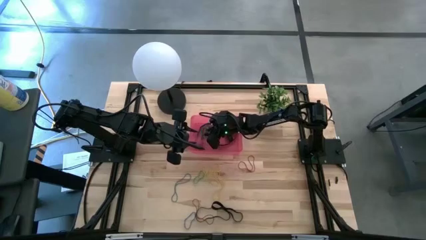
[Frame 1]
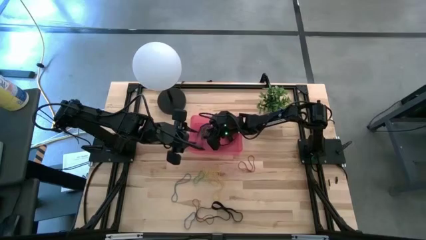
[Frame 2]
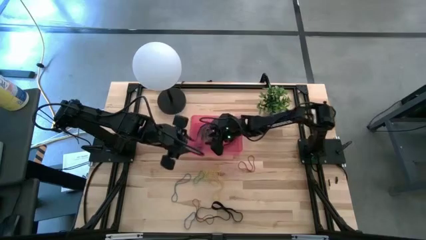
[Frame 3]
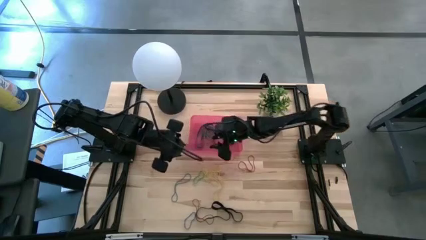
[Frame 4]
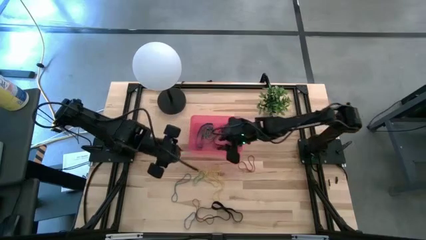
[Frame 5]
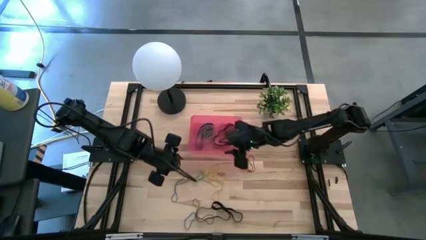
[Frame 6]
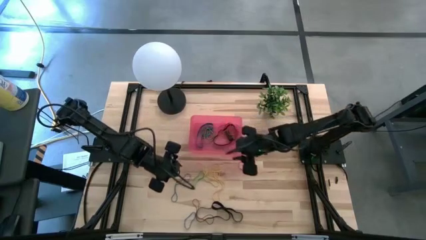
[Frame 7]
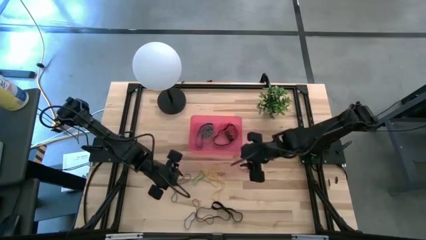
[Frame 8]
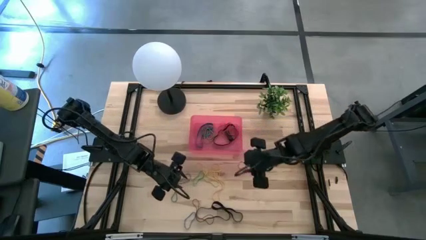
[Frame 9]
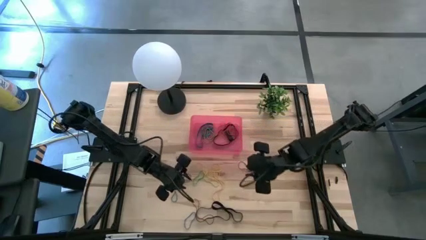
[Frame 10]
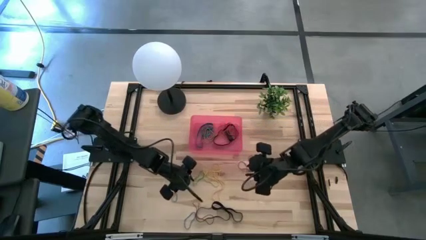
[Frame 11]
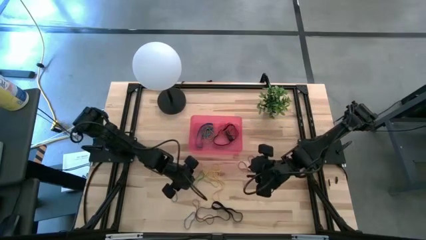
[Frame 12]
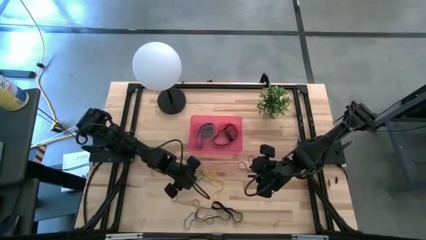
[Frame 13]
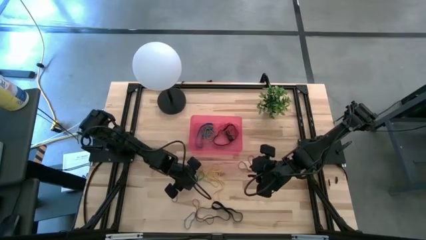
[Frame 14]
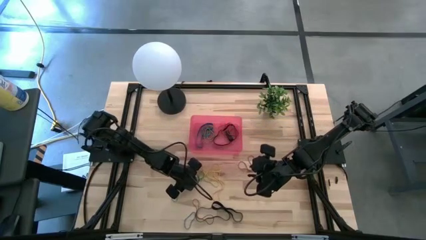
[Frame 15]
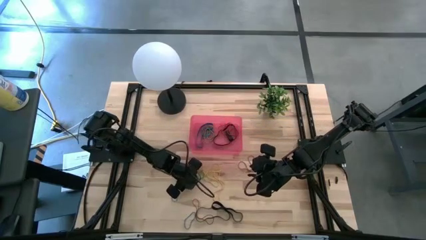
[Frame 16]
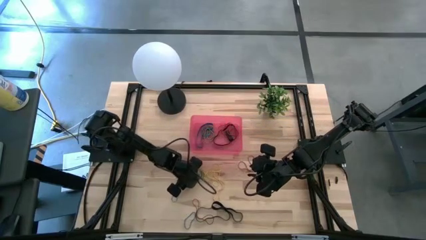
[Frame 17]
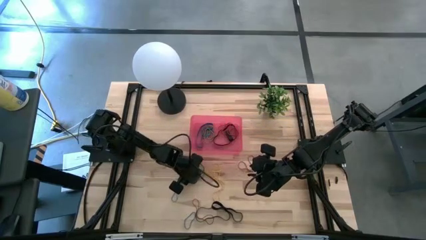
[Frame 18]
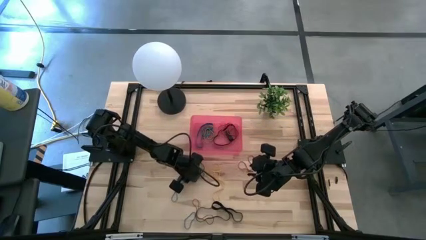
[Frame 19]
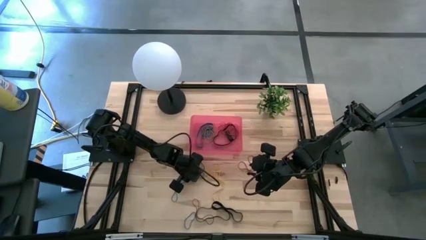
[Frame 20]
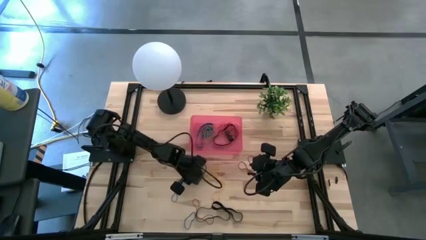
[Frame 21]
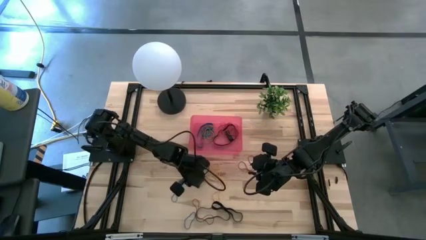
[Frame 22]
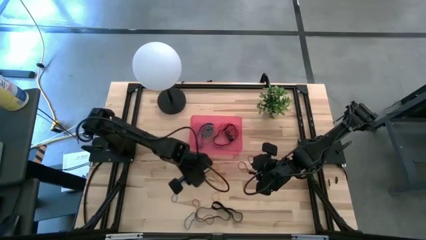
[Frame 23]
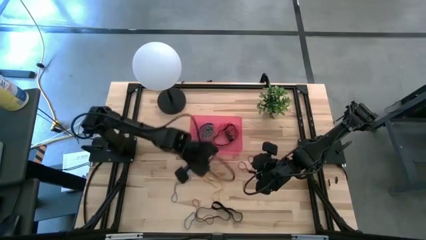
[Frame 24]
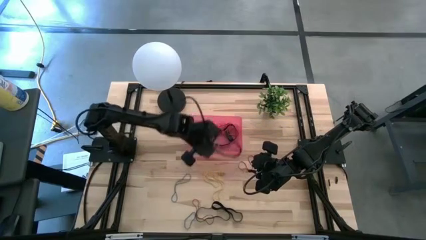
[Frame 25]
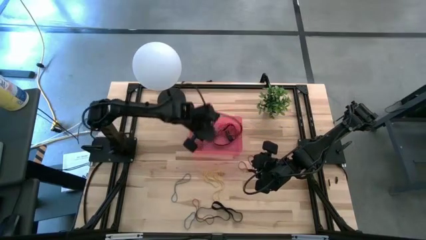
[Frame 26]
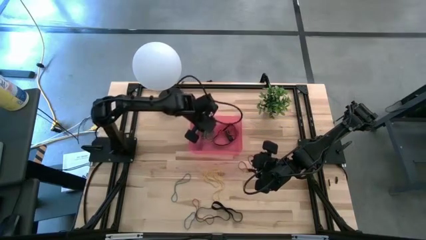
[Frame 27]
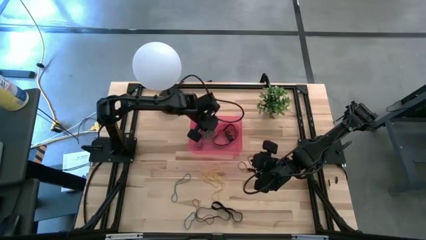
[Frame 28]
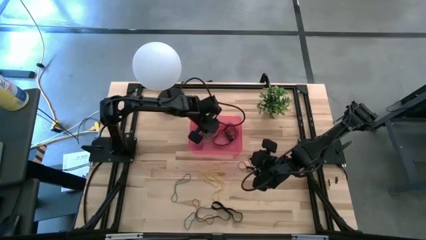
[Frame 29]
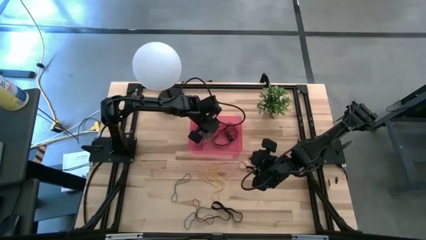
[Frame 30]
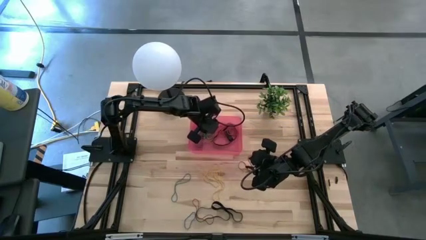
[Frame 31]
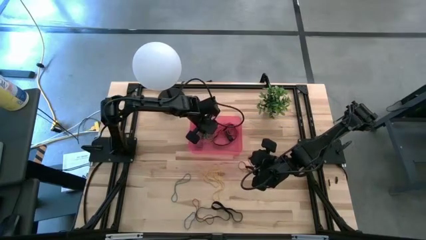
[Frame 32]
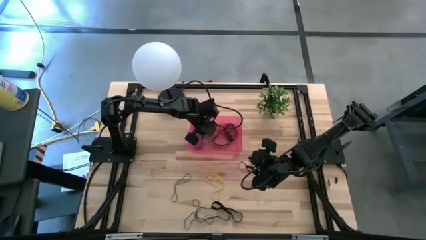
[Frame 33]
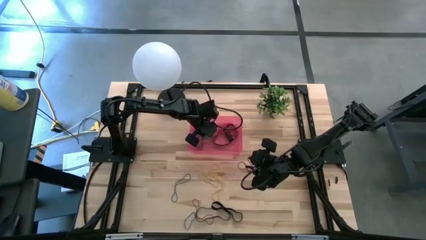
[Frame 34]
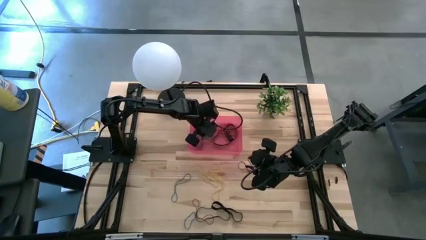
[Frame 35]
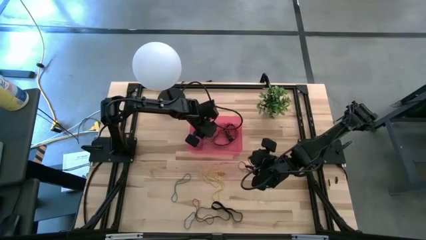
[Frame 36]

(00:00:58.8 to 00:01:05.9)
Task: Pick and place rubber bands into bin
Put the green rubber band into the red bin

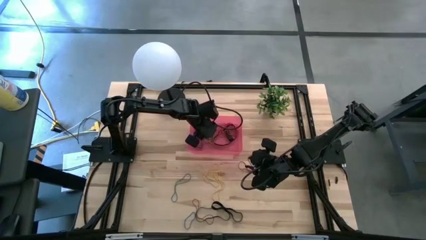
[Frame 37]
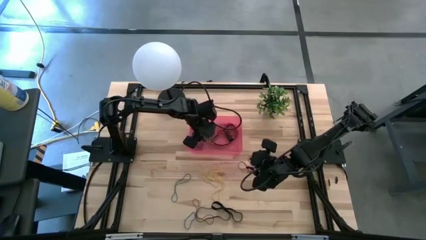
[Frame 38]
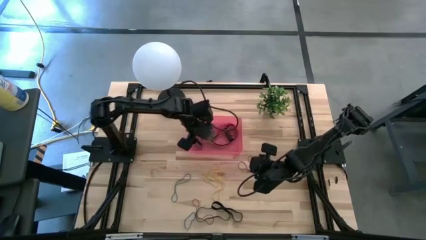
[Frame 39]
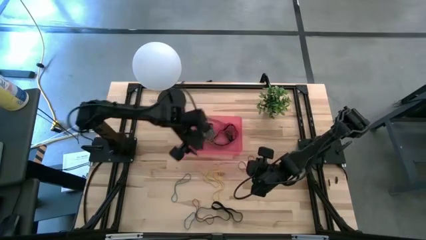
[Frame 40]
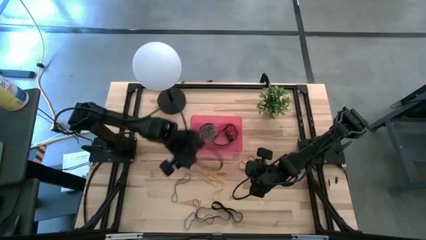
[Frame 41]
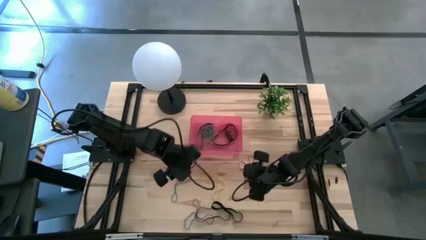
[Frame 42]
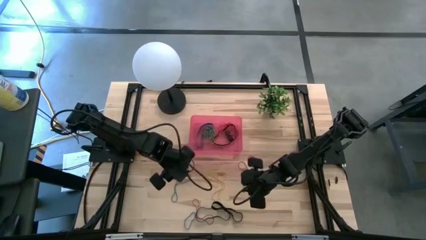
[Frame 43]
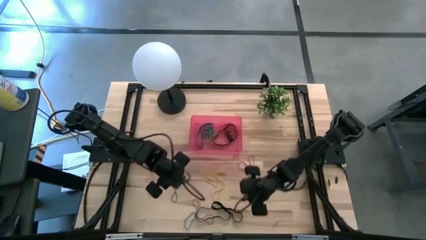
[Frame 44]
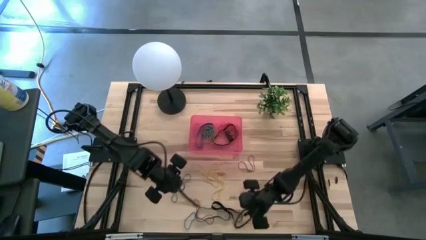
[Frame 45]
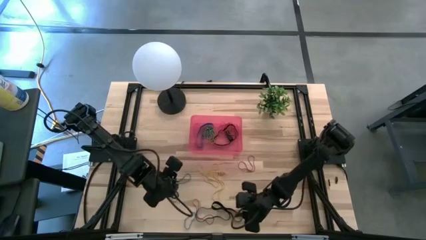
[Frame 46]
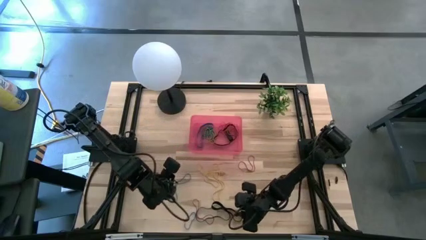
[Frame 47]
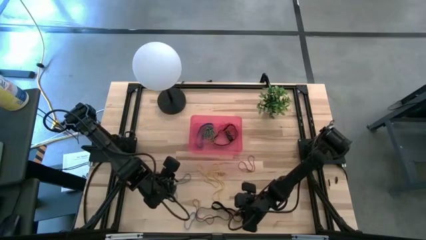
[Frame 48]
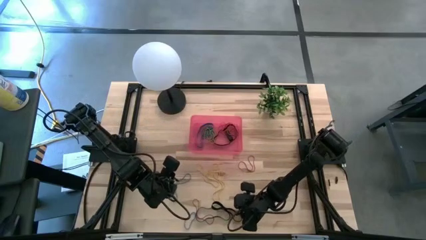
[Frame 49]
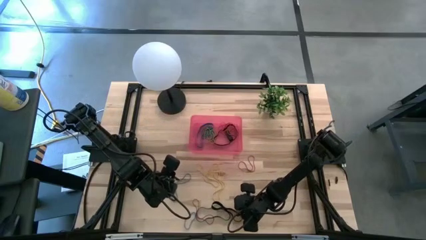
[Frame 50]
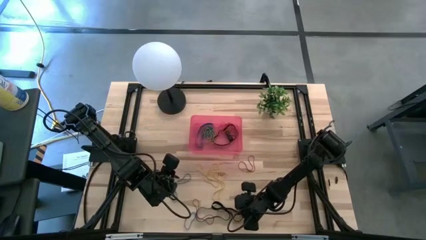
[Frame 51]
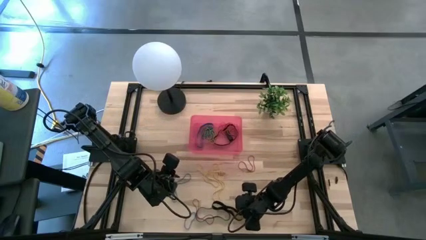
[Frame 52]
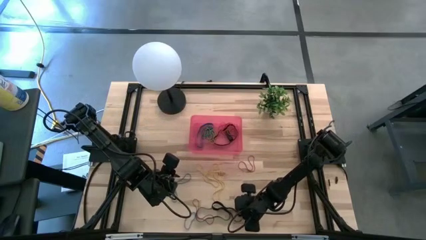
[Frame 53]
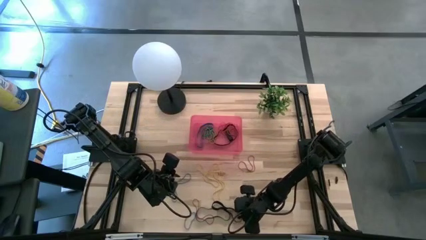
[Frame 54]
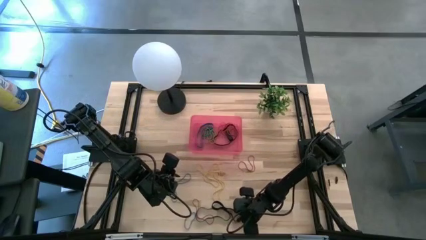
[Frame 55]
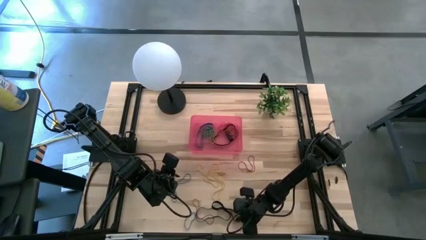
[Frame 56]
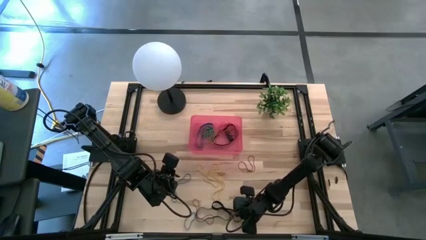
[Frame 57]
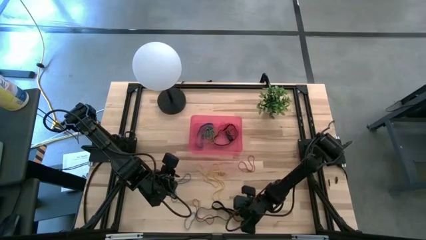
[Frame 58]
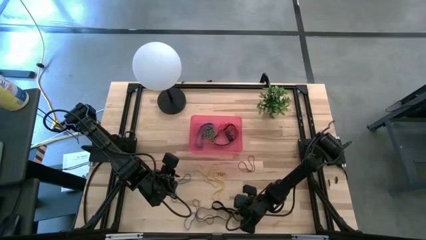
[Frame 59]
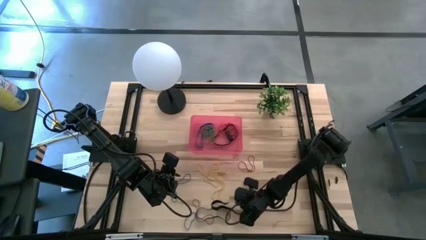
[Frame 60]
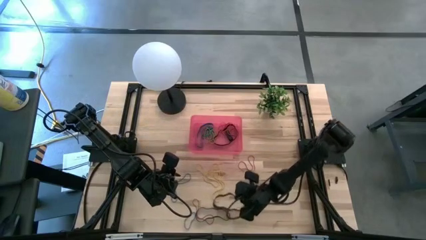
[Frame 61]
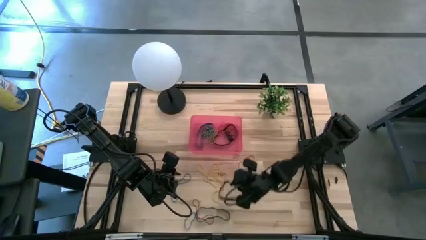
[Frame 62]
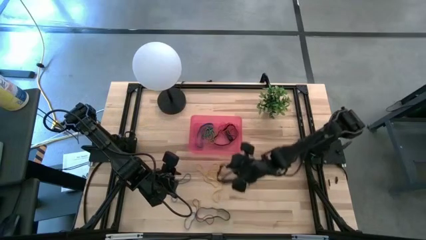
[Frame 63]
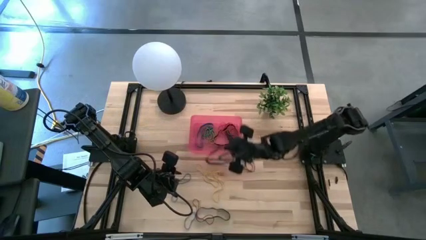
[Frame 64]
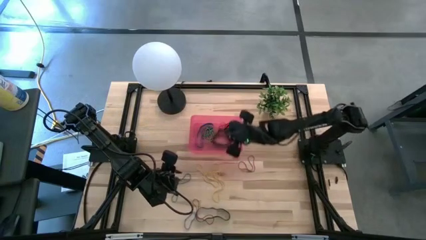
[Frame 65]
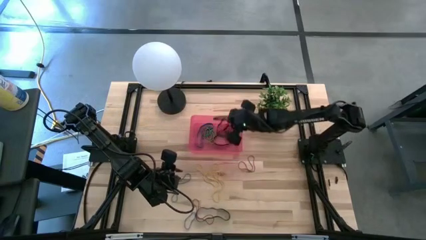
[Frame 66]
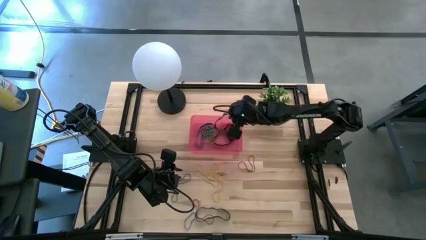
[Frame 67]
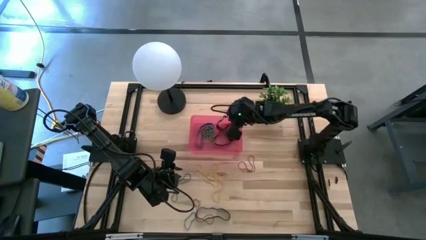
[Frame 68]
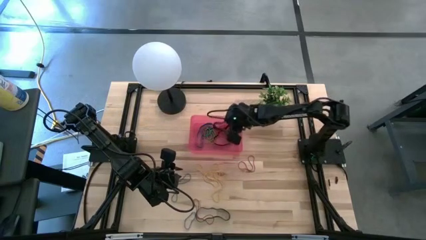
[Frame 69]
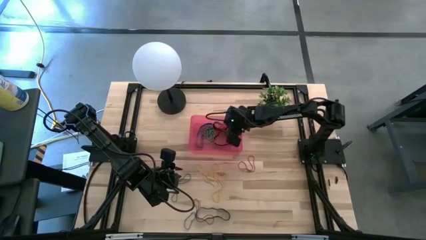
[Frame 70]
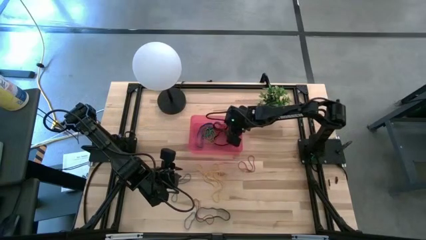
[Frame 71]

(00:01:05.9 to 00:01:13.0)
Put the black rubber band into the red bin

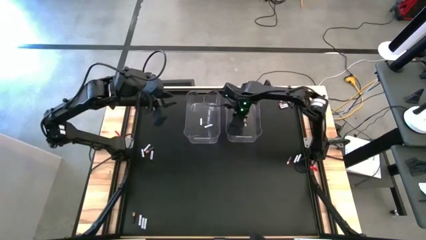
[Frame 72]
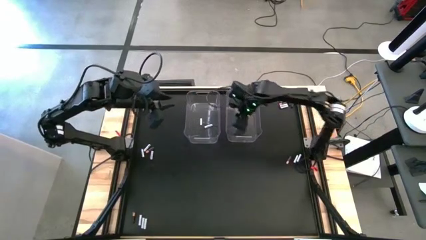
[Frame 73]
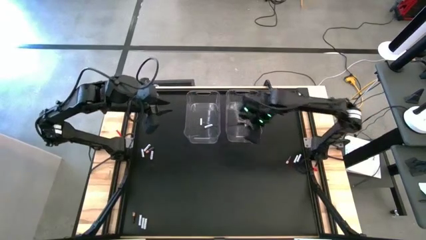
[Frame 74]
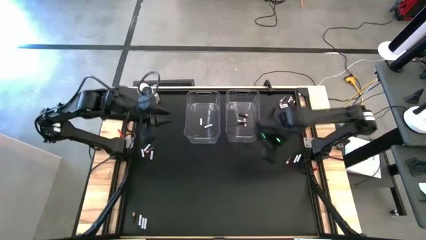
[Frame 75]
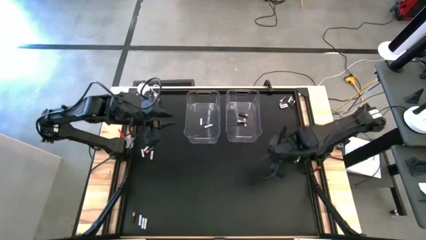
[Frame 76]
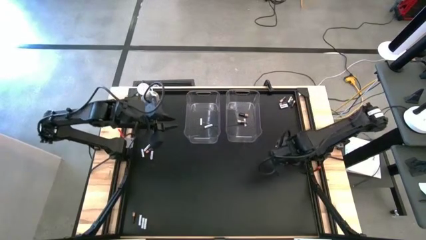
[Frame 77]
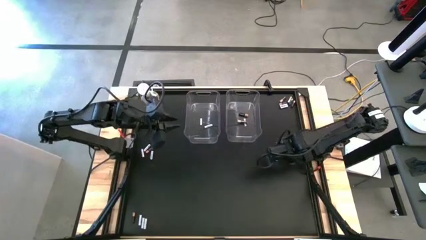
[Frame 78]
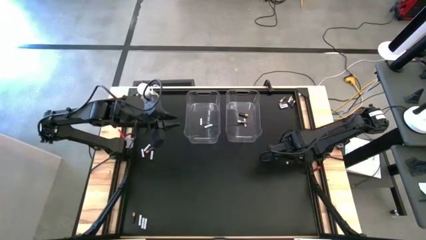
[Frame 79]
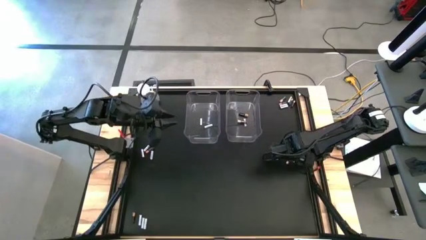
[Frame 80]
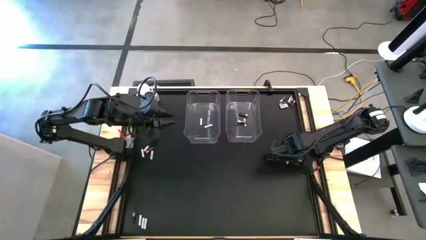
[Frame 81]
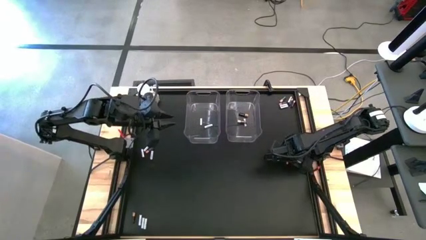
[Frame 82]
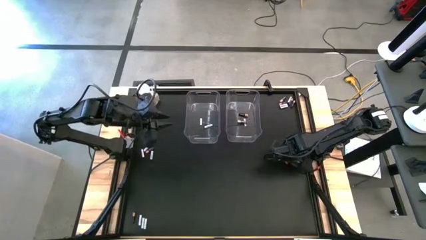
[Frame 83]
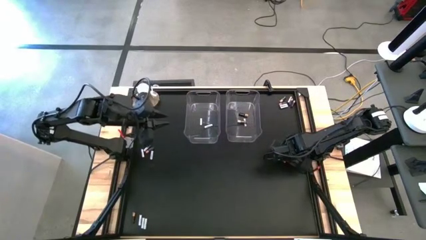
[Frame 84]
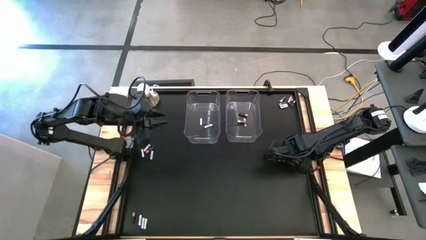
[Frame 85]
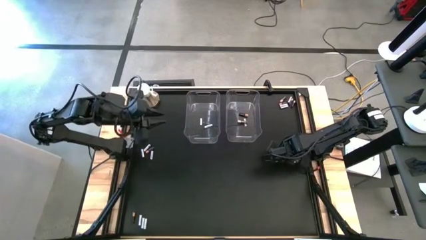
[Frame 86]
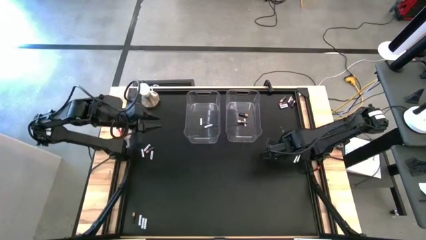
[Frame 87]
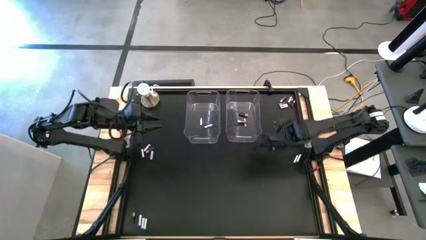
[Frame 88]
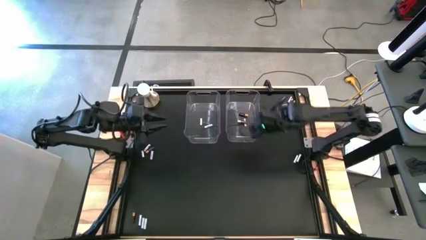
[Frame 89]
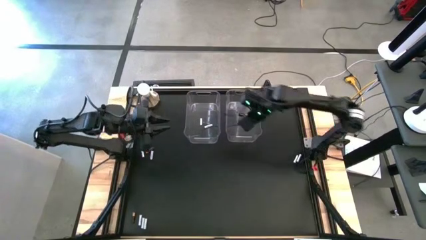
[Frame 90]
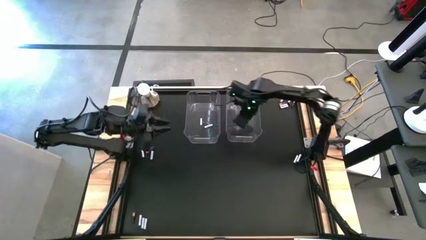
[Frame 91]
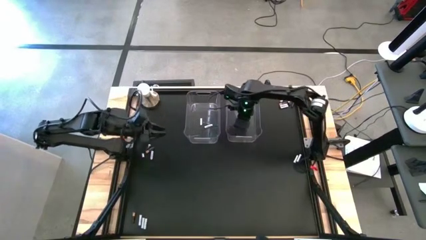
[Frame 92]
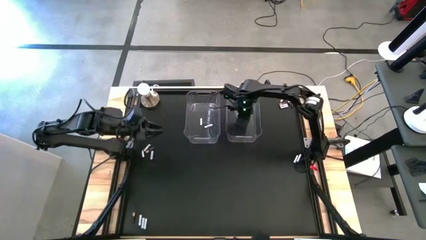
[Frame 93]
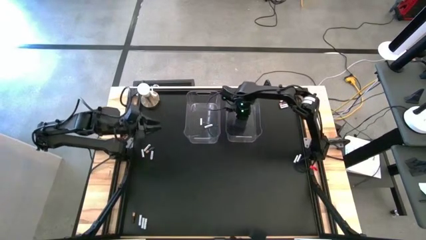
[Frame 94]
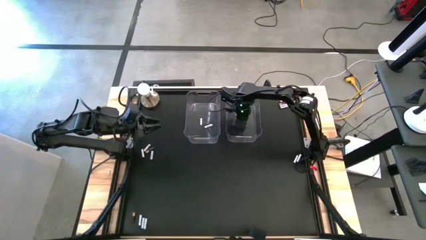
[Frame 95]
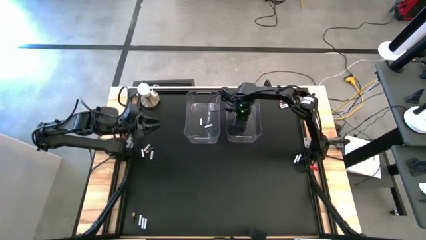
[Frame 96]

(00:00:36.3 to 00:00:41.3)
Task: Sort batteries
Put the brown battery into the right transparent bin
